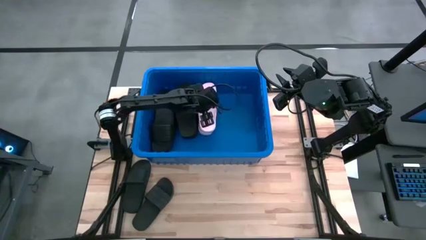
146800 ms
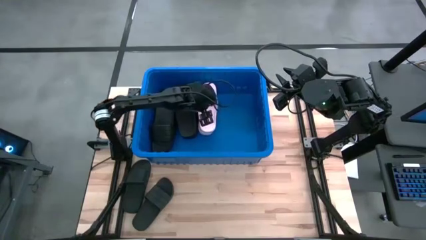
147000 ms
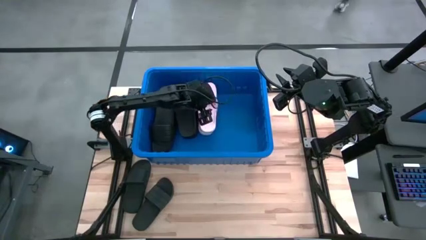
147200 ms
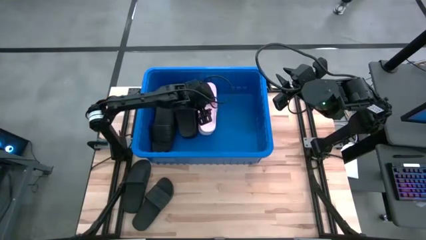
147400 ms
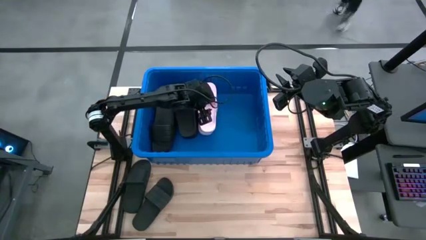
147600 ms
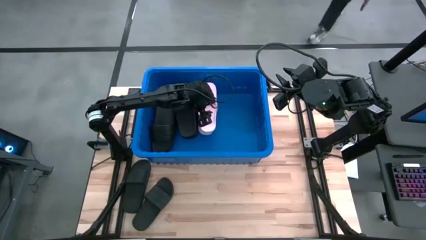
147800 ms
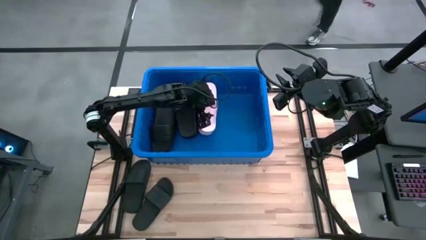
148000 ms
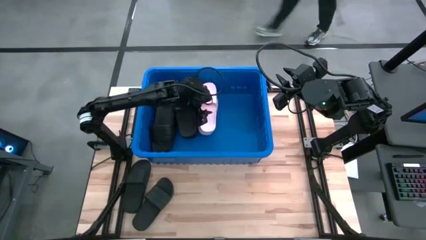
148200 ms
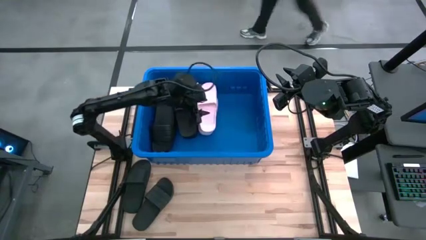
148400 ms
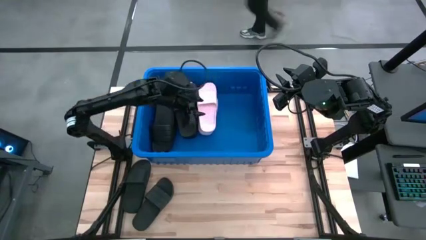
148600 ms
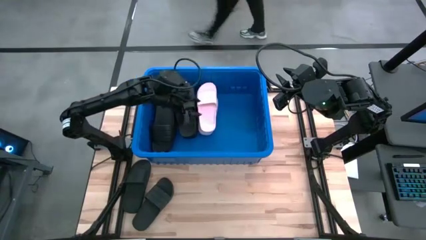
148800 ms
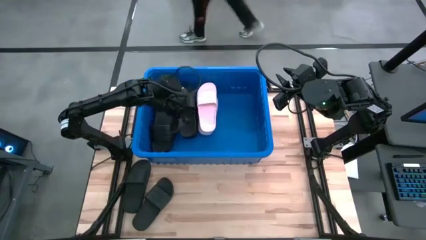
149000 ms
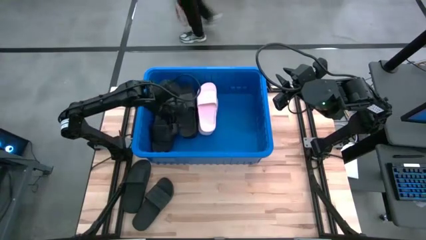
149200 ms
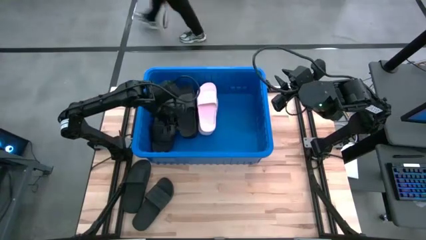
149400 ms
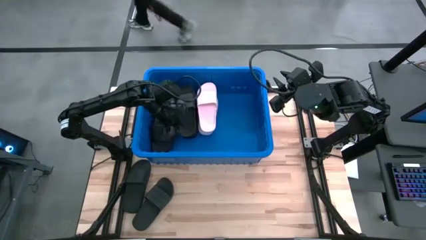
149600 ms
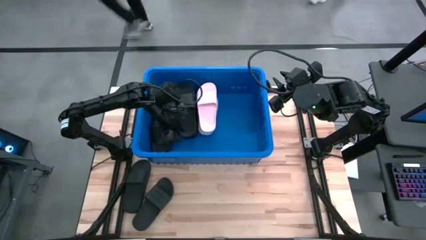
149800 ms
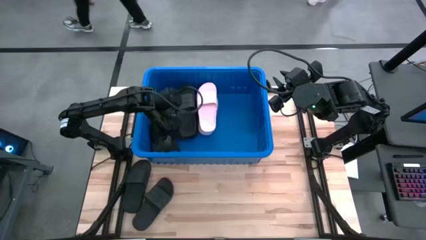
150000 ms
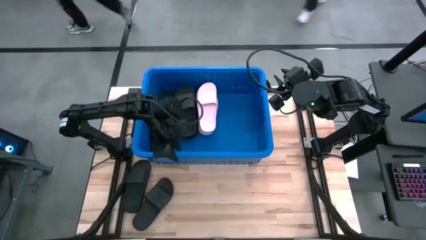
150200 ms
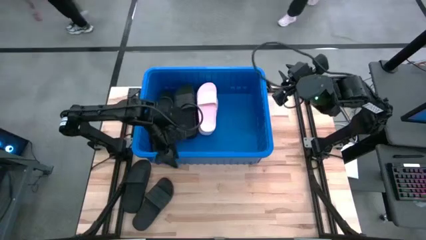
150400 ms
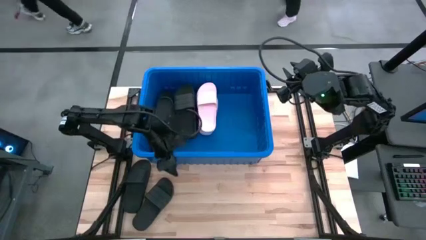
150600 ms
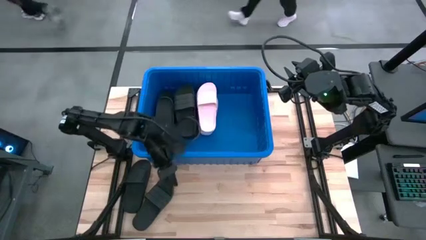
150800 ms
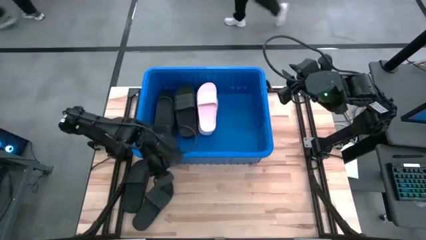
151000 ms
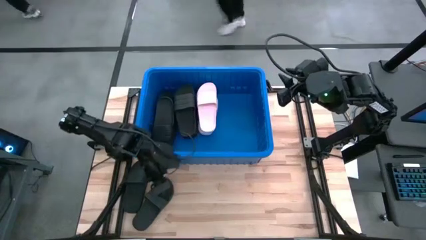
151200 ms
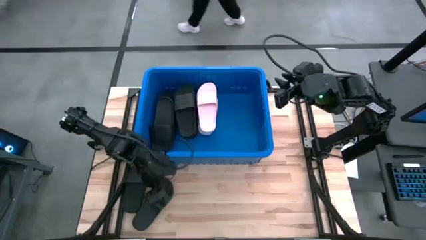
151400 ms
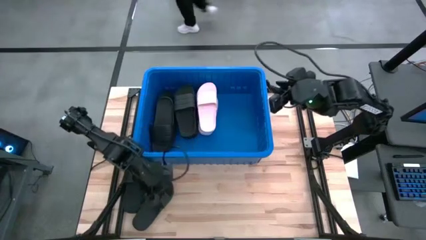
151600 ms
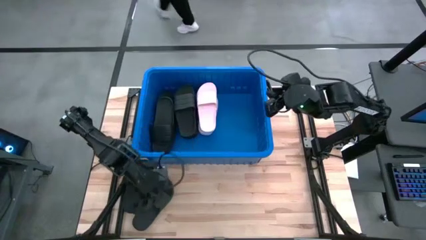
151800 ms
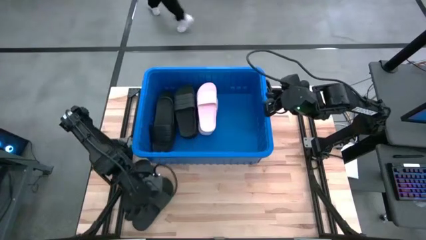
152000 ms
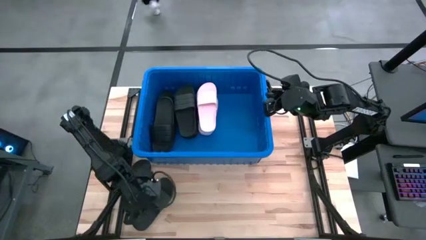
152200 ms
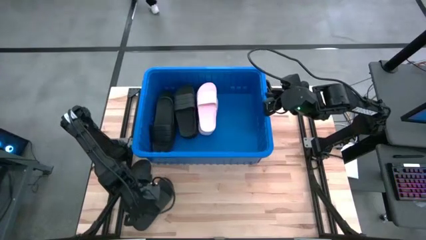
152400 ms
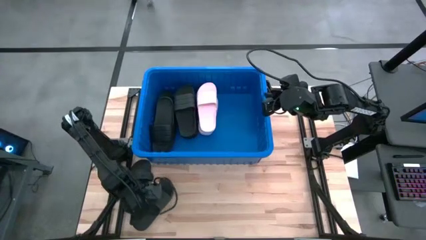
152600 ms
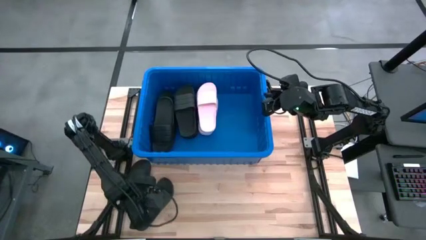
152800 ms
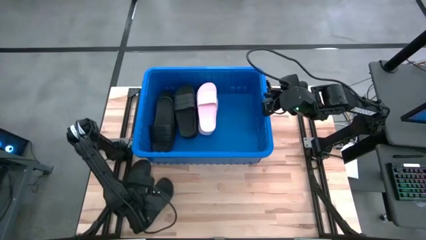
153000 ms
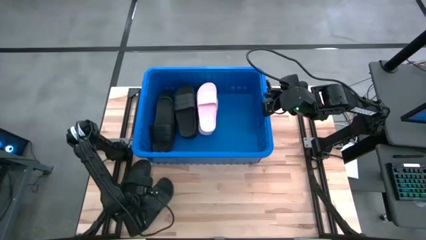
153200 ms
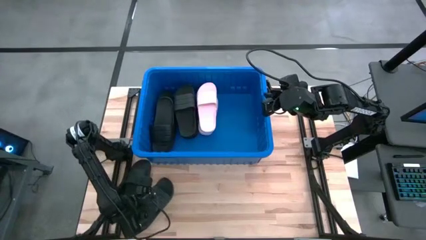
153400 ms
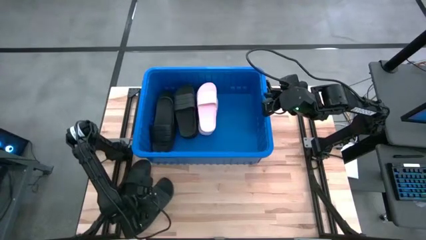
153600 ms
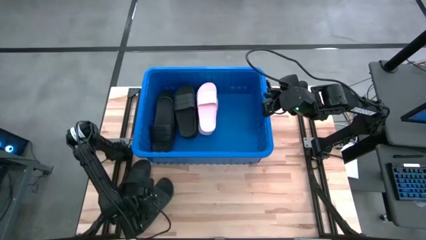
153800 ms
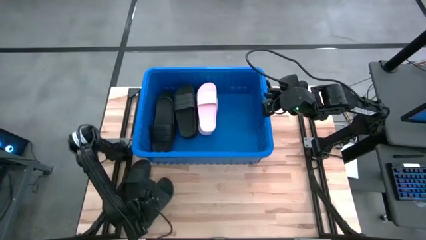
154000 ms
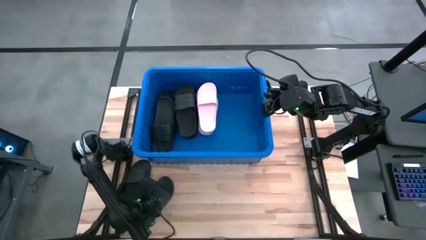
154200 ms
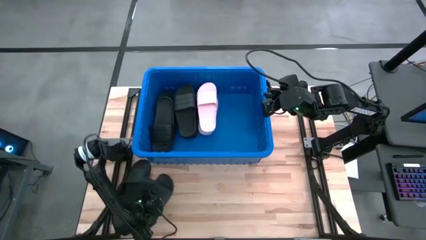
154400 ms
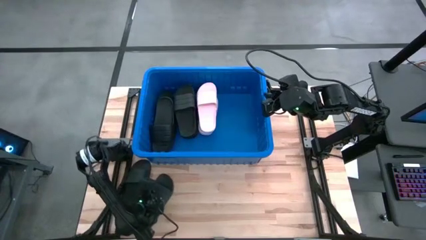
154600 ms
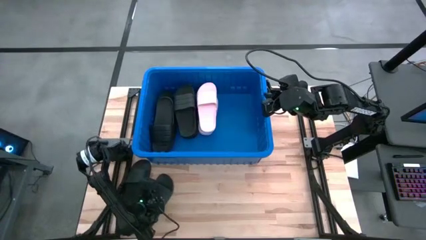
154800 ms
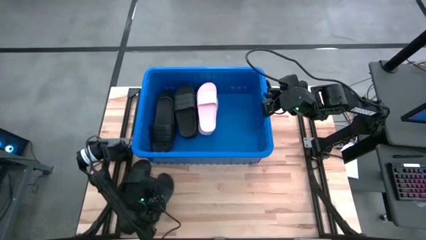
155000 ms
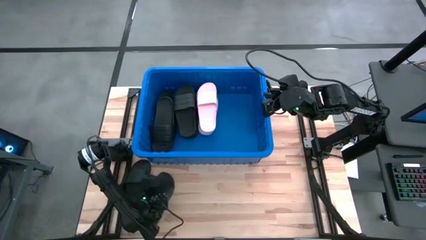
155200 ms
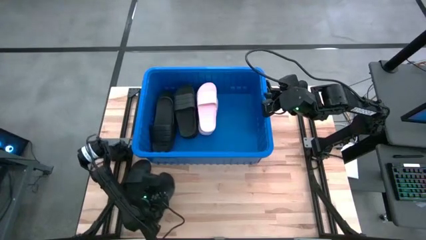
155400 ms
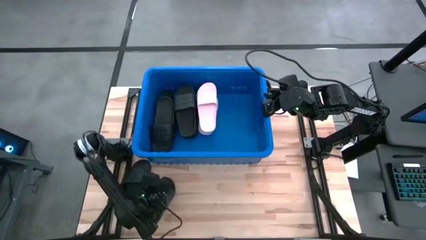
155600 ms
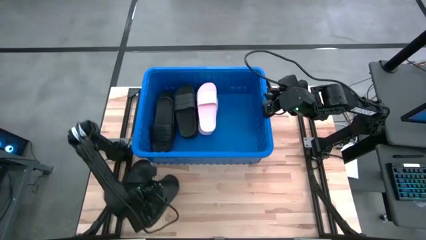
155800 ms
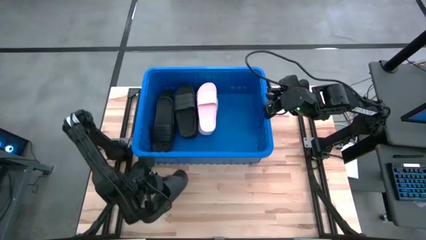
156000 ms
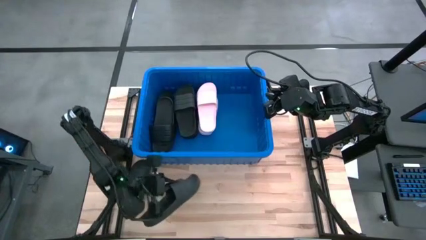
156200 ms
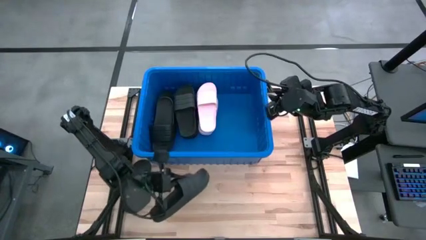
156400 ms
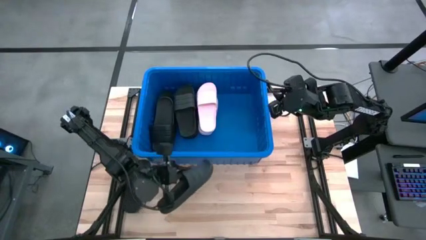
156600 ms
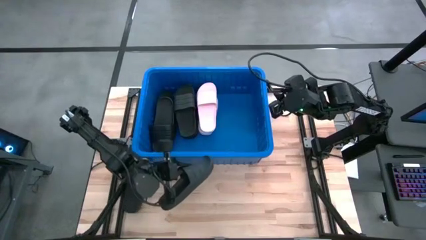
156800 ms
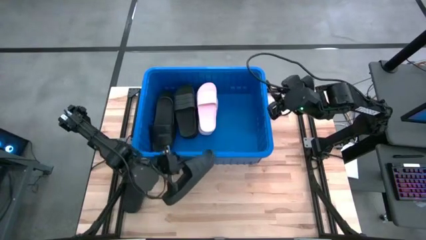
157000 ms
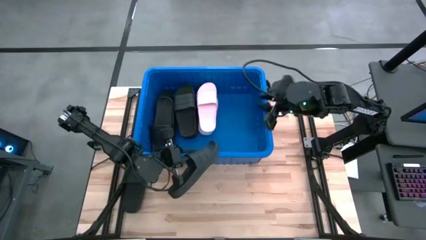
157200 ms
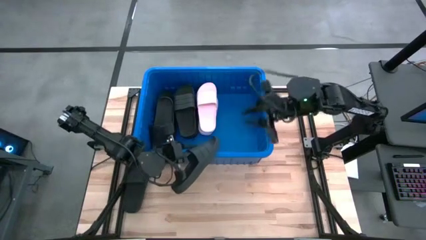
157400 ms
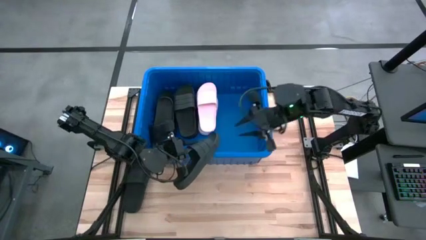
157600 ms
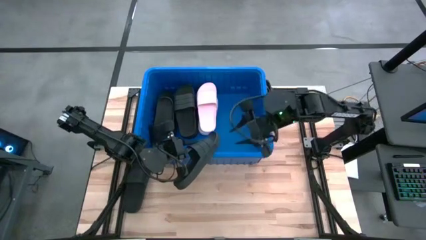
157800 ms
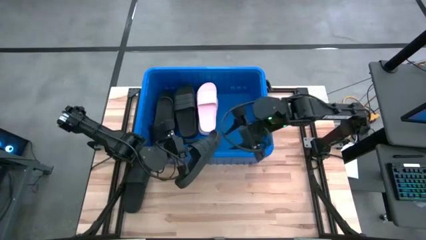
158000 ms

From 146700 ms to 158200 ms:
Task: Pick and place slides into bin
Put the right black slide into the blue container

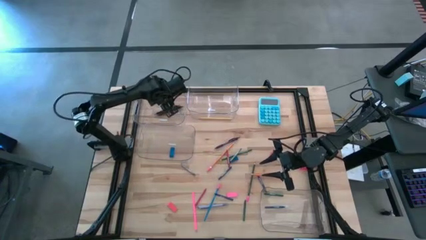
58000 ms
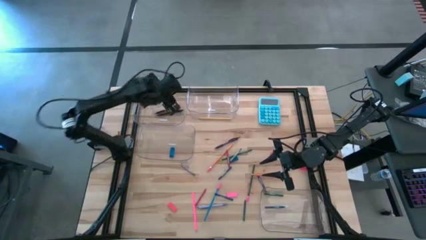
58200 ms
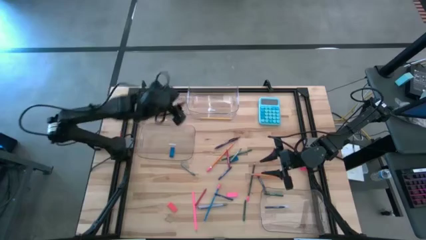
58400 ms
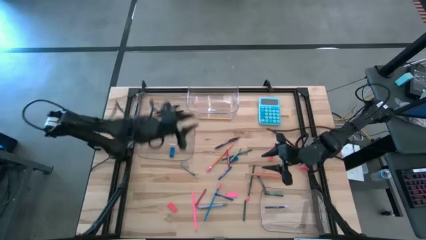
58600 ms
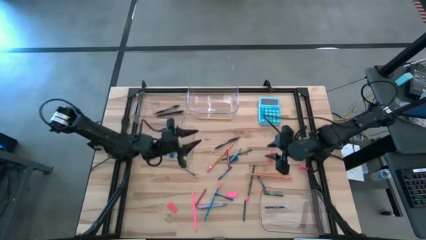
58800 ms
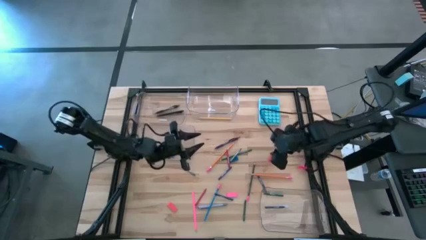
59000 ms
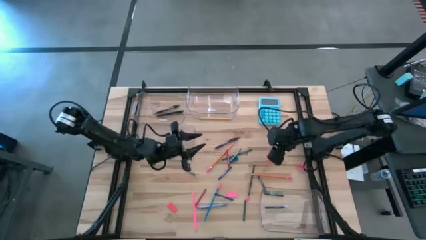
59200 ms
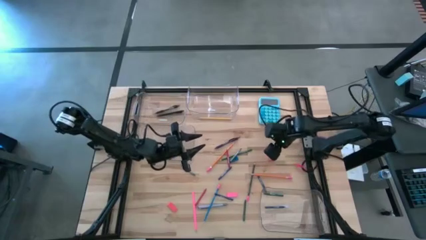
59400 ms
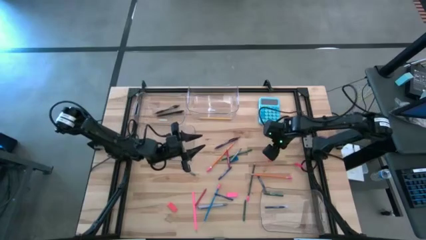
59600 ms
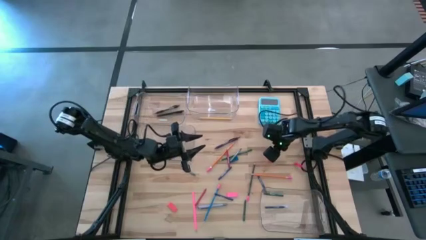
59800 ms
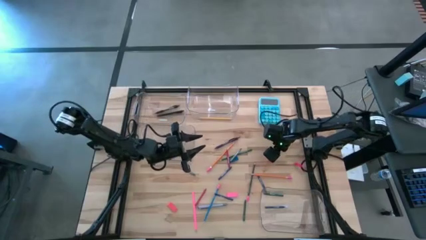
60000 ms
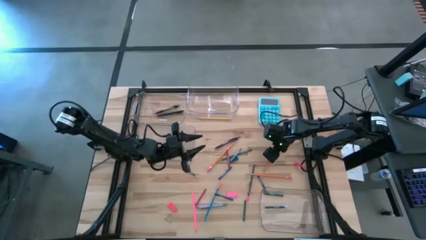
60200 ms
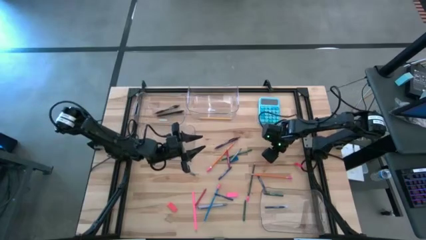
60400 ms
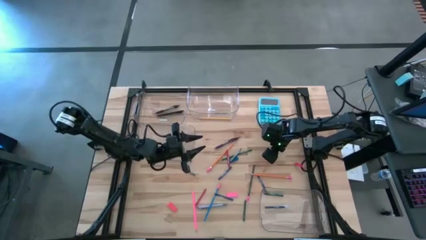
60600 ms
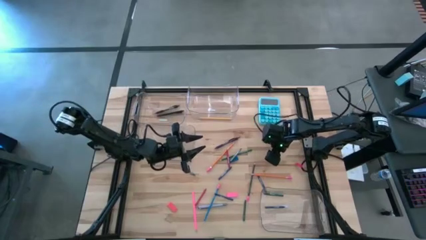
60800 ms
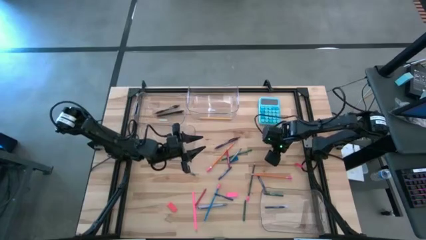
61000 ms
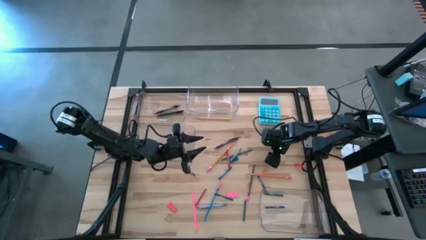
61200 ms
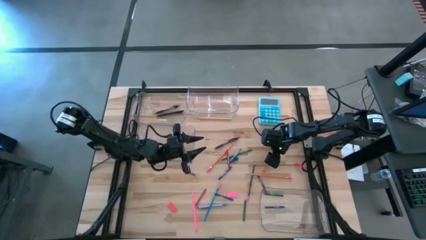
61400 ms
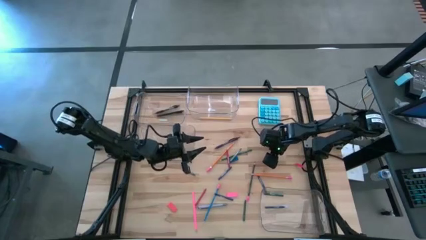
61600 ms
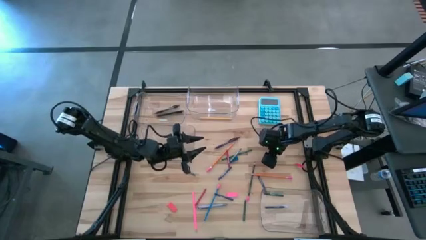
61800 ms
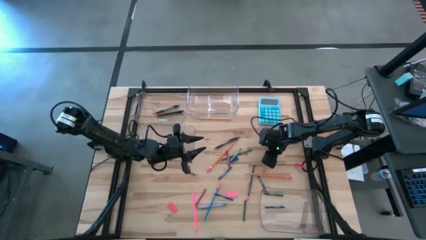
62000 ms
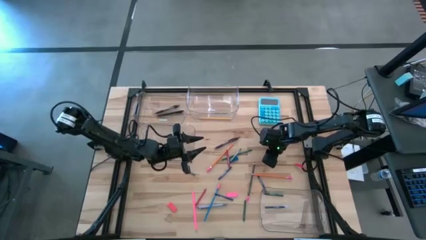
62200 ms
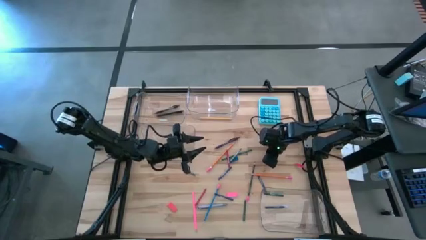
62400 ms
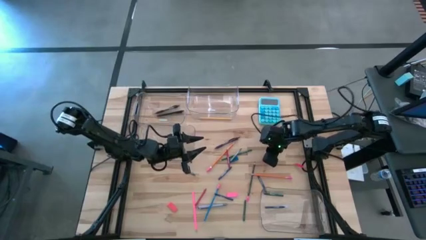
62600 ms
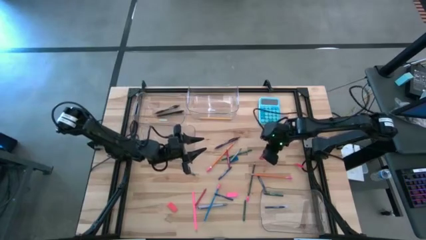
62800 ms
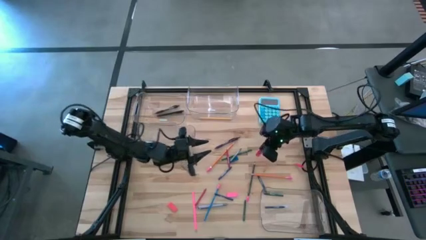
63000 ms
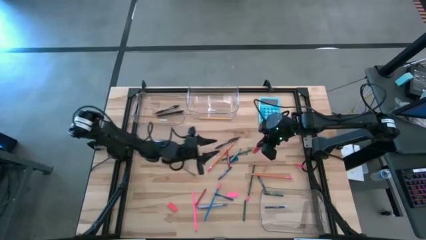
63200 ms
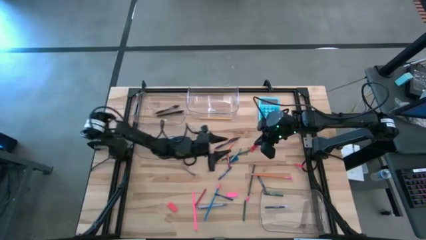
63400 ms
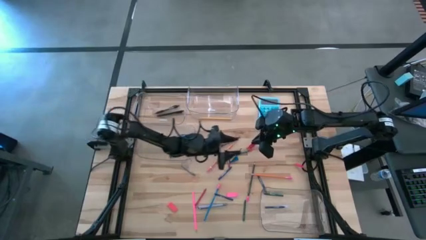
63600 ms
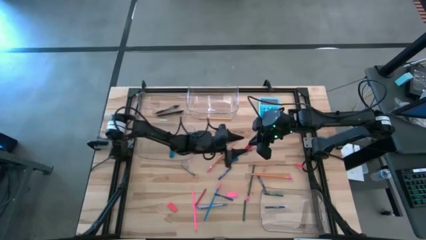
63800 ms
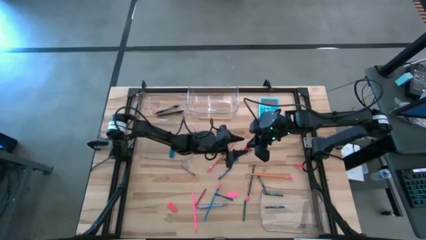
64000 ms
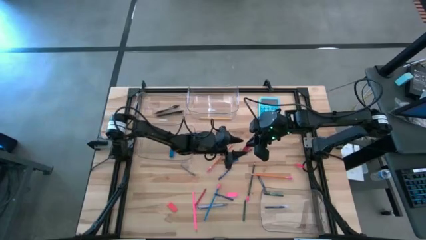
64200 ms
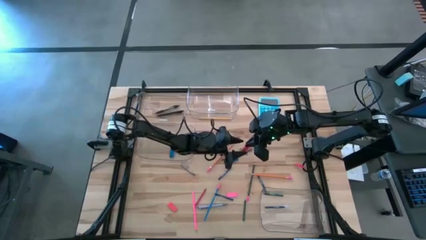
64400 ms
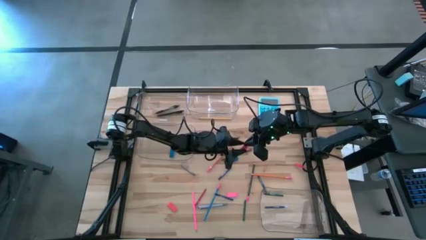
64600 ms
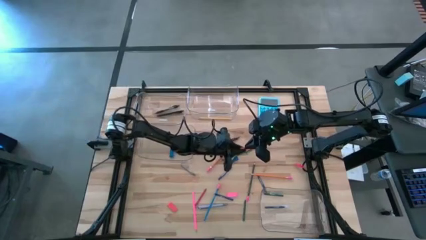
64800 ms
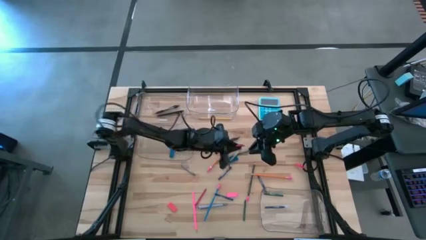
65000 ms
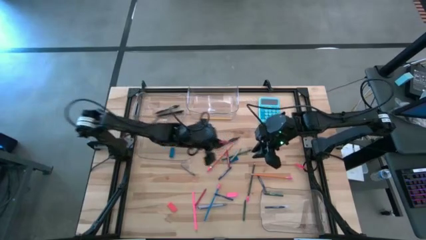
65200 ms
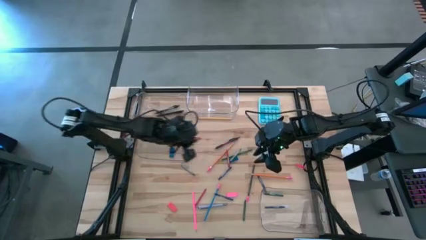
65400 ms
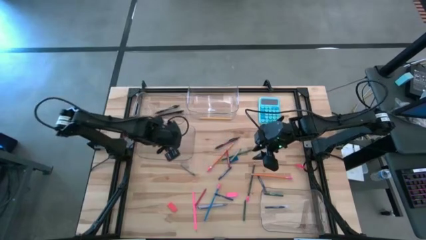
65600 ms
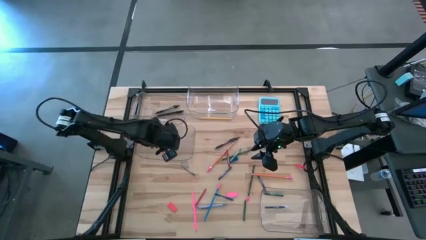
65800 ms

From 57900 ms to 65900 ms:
Task: Sort crayons/erasers/pens/pencils in bins
Put the top orange eraser into the middle left transparent bin
